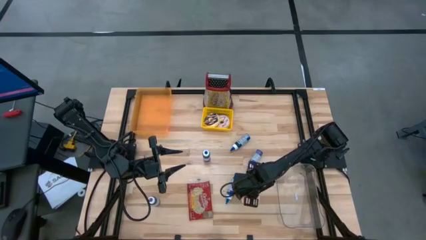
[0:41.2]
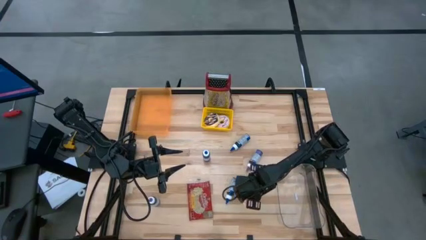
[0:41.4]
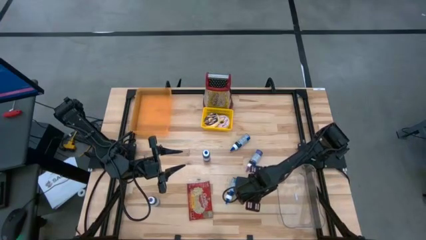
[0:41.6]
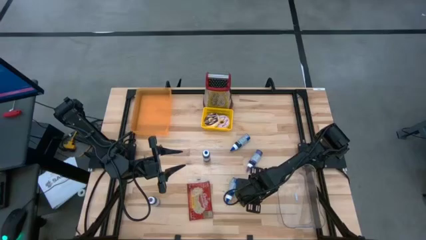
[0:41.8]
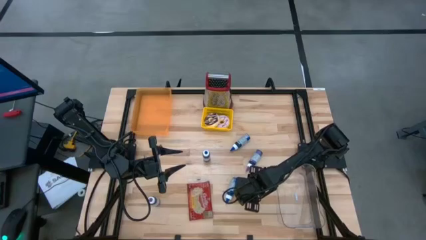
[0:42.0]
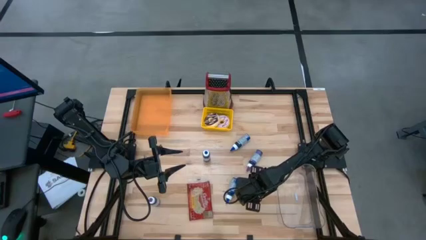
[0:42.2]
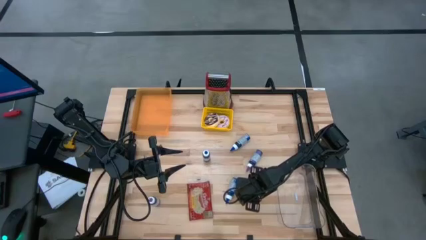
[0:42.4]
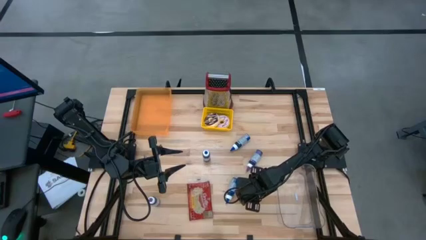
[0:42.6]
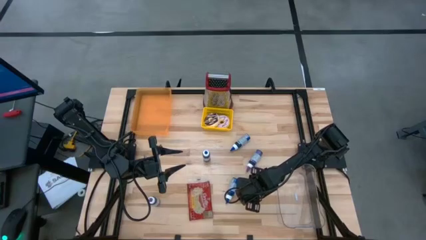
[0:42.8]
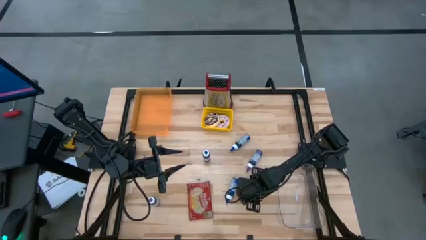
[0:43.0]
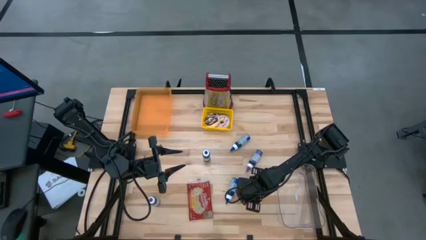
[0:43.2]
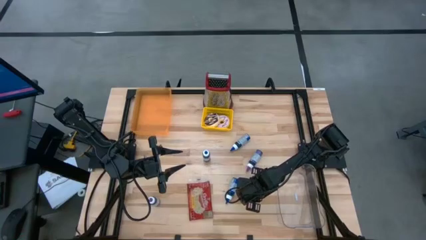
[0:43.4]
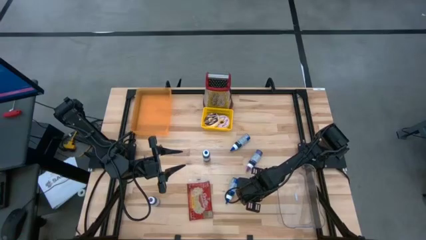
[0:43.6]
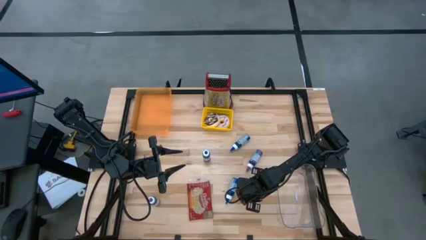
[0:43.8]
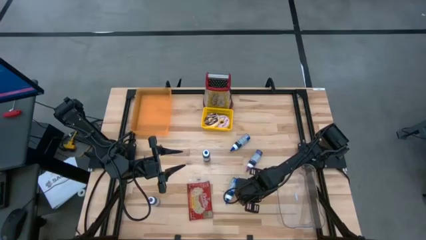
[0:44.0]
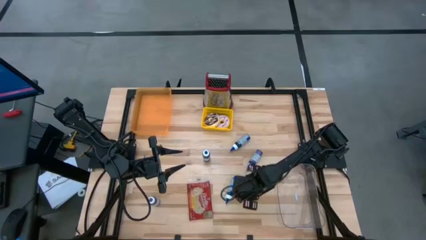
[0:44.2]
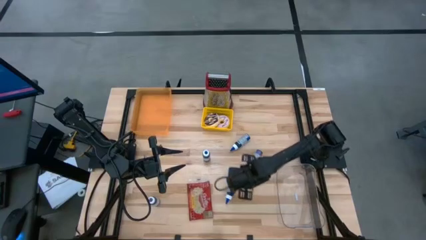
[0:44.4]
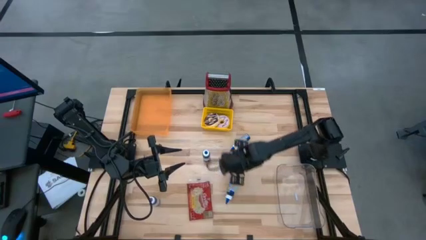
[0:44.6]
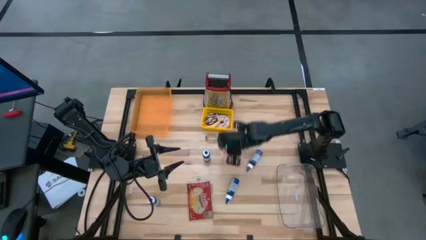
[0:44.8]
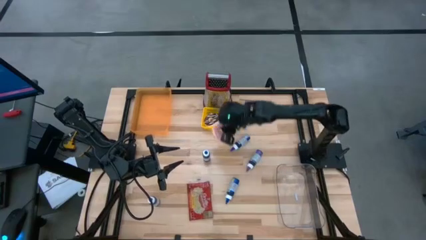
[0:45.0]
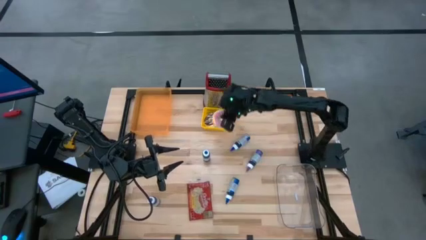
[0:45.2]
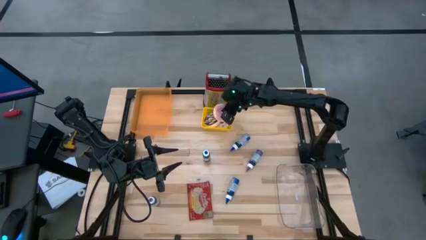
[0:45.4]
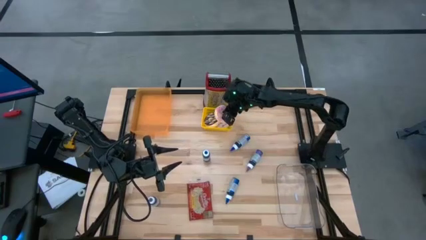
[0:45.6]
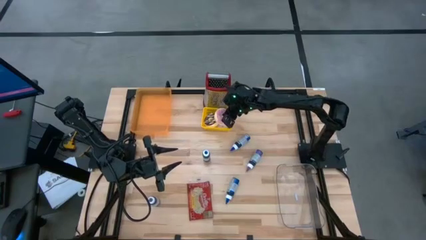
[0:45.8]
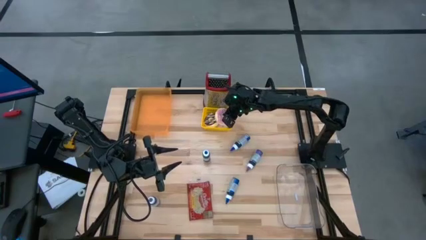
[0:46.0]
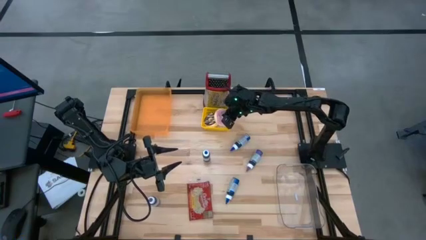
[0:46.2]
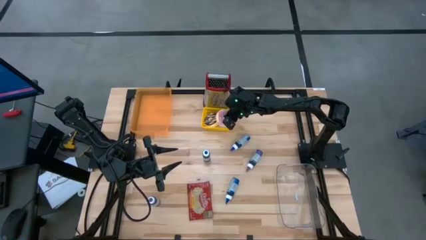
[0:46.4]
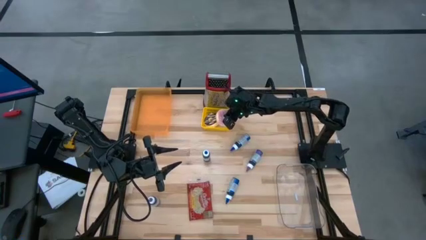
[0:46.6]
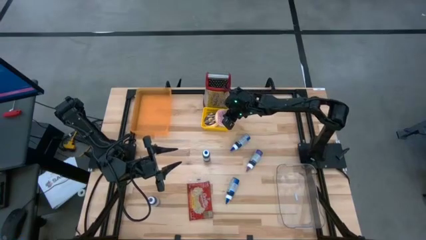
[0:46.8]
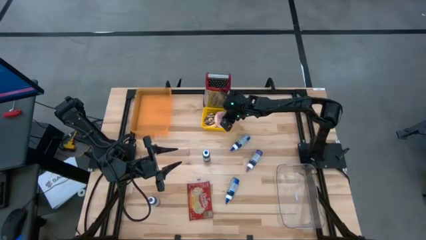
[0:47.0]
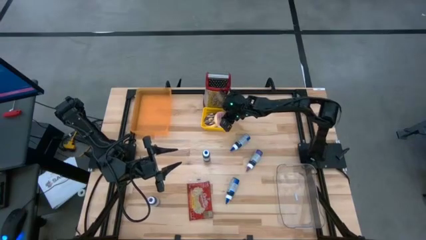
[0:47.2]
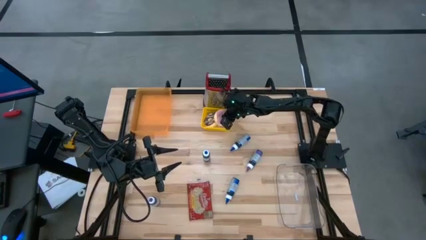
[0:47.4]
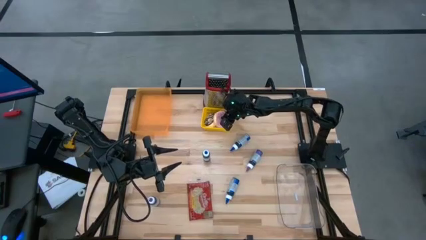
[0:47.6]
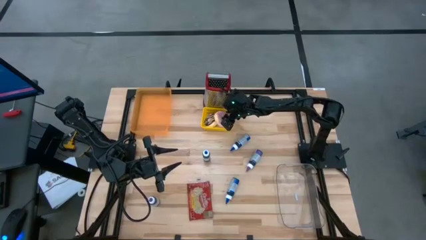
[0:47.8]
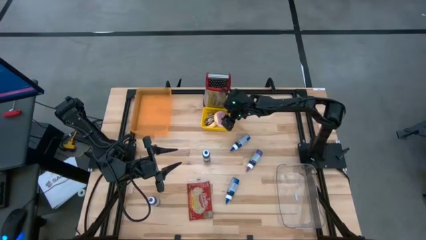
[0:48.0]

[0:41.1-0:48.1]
Put the pink donut into the yellow bin

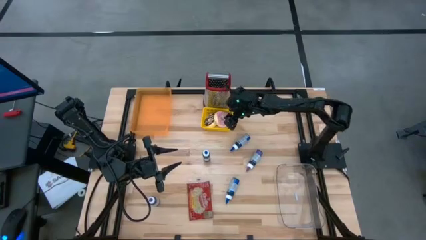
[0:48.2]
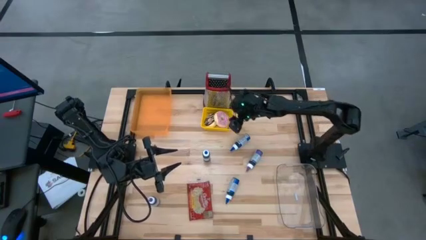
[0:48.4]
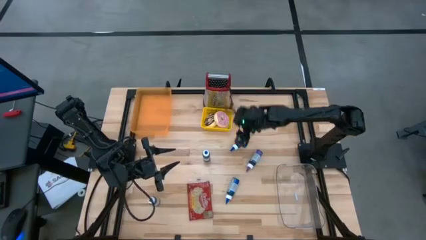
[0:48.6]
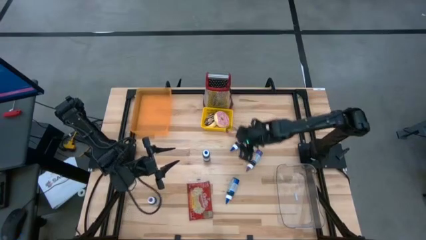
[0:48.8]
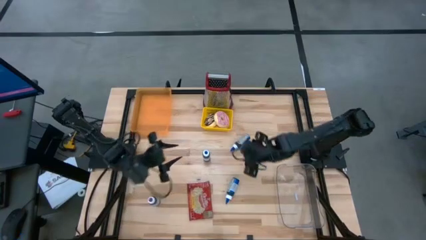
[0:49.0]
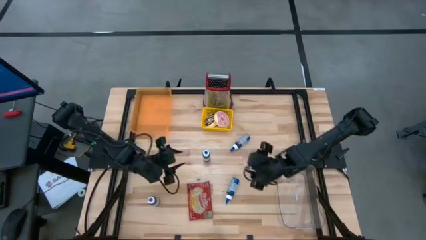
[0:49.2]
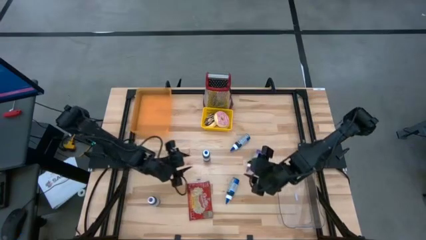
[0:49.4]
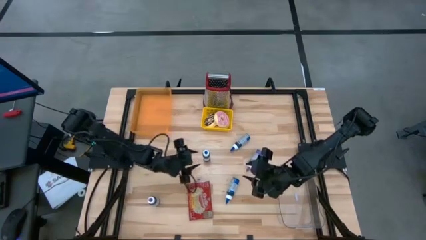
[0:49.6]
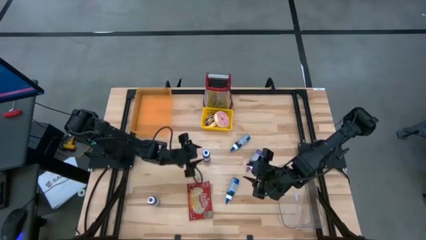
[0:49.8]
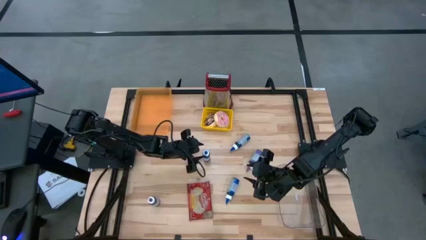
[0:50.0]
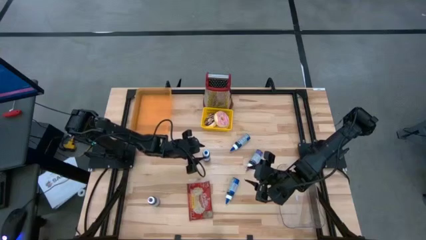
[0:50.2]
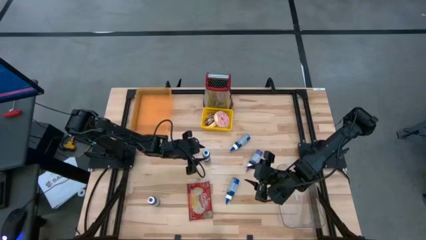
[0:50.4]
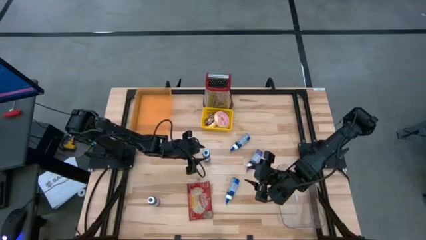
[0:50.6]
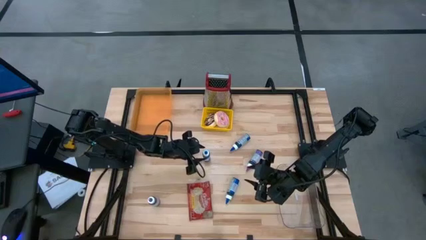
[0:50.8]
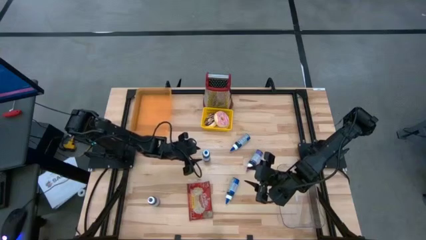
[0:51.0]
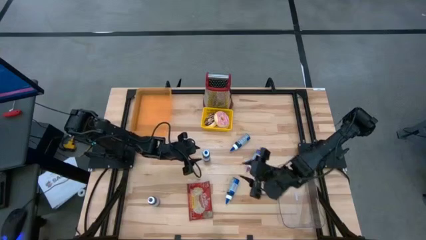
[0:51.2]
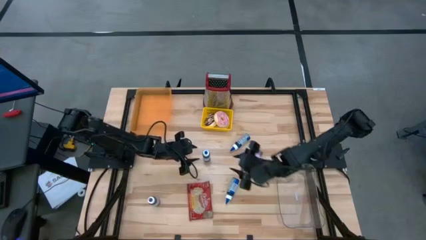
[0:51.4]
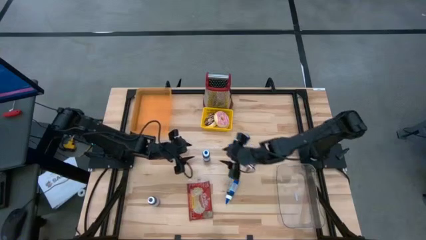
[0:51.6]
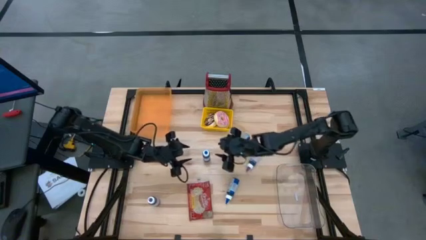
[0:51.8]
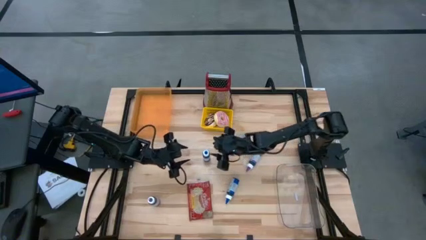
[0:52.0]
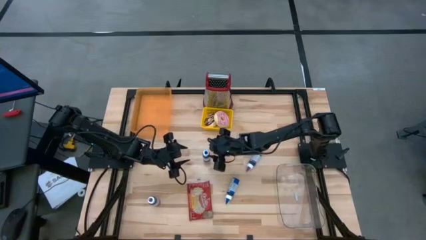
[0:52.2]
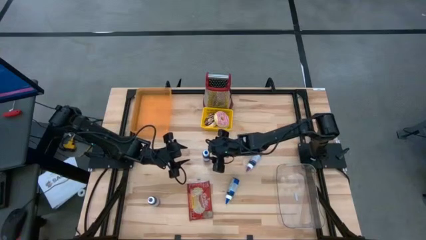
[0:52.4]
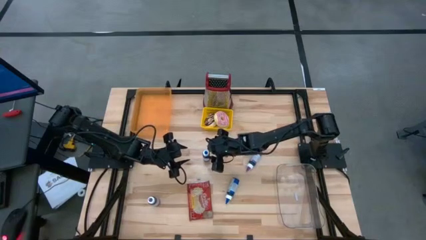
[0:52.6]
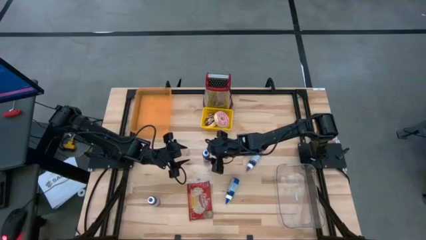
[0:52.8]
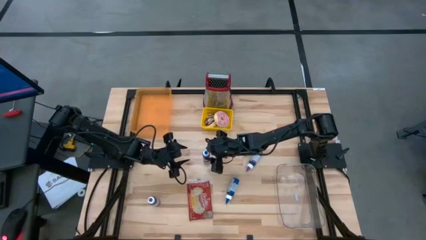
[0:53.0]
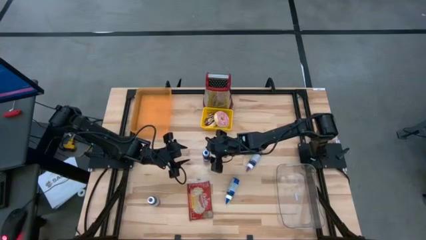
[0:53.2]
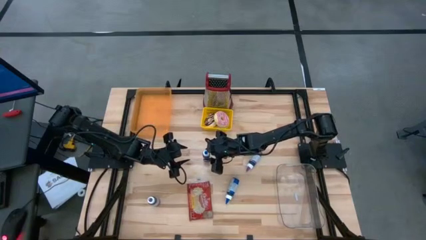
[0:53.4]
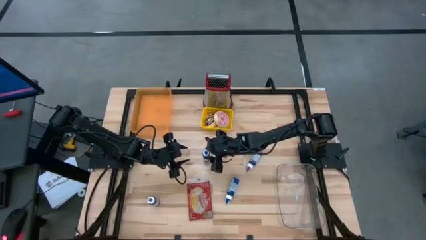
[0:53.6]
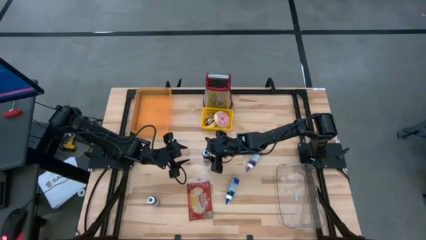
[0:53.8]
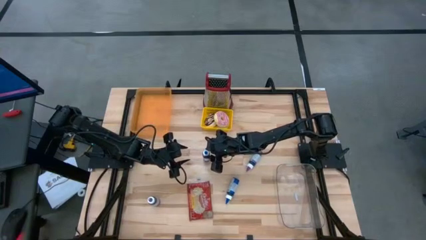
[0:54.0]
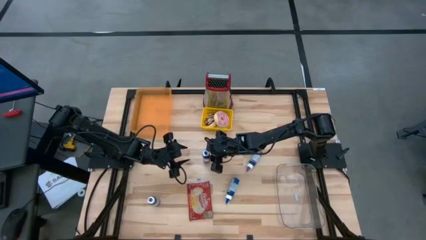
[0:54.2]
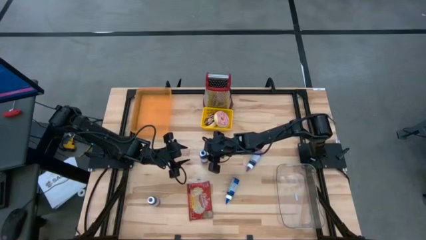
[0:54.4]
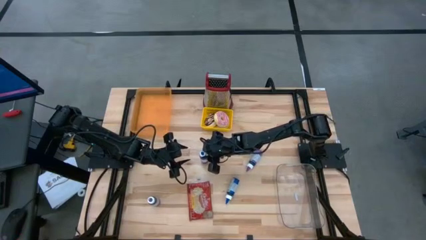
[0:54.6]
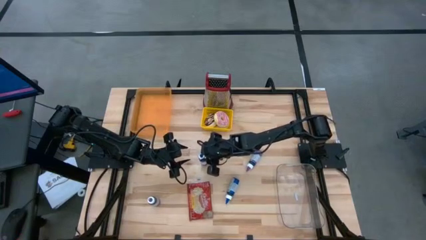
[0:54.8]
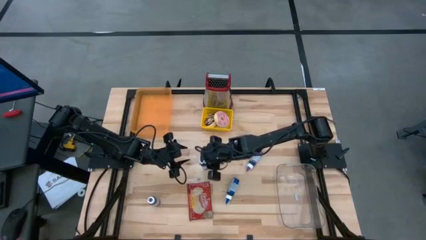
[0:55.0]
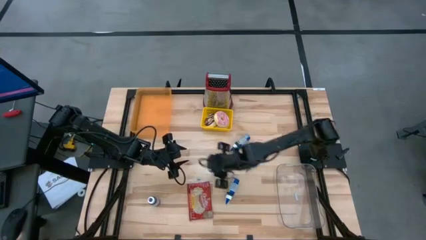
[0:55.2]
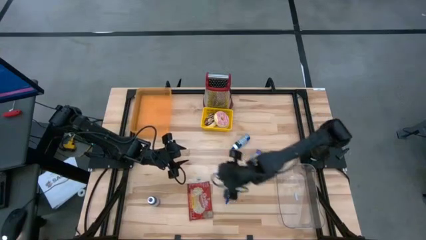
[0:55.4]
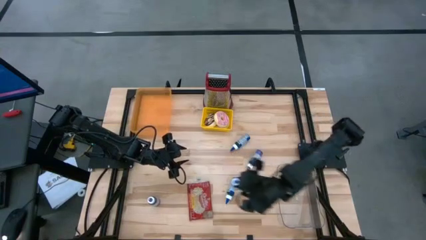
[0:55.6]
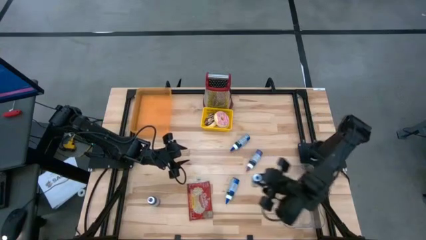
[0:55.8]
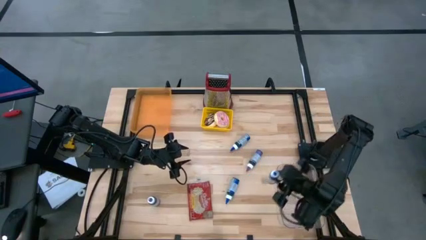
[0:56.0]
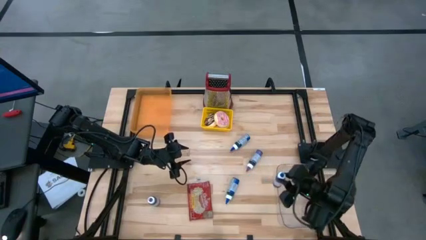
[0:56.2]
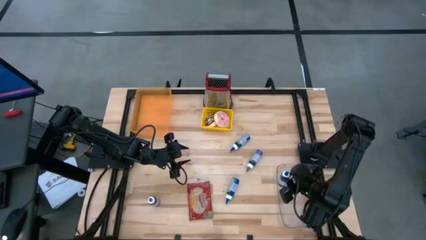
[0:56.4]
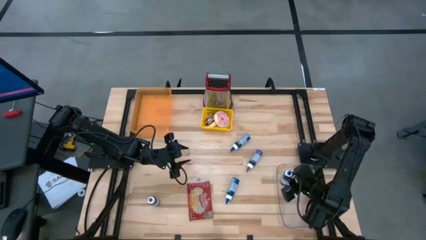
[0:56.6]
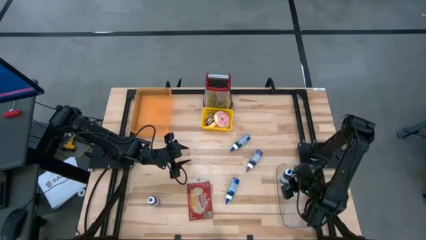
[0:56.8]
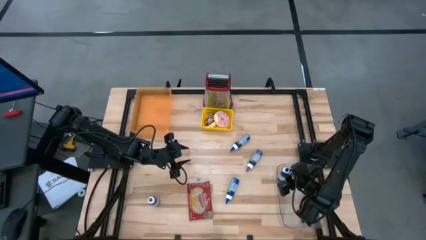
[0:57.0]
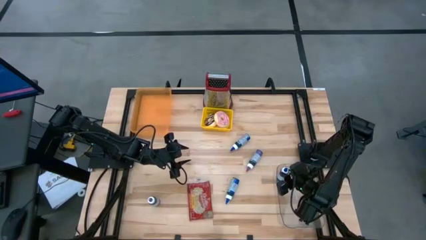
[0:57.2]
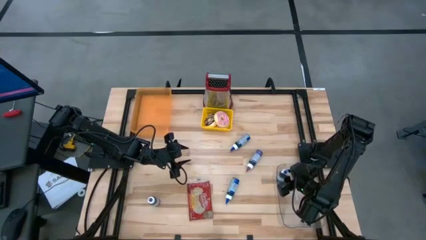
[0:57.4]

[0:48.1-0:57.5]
Put the middle blue food coloring bottle into the transparent bin
